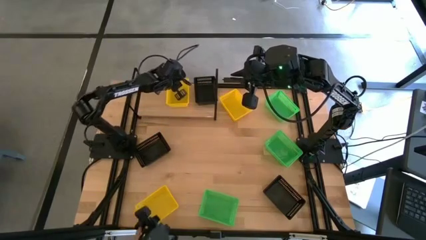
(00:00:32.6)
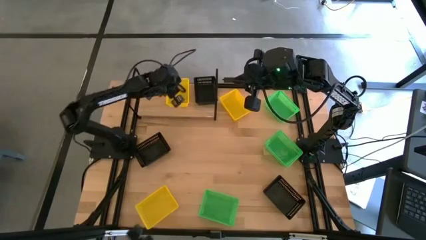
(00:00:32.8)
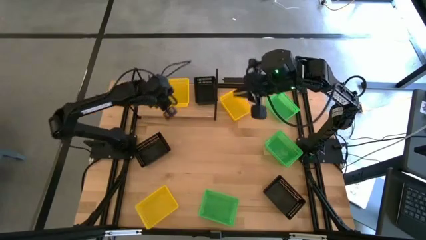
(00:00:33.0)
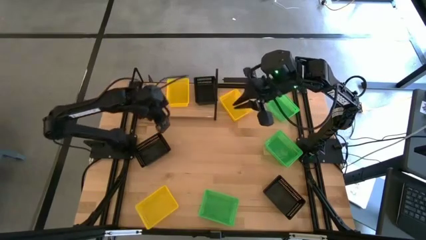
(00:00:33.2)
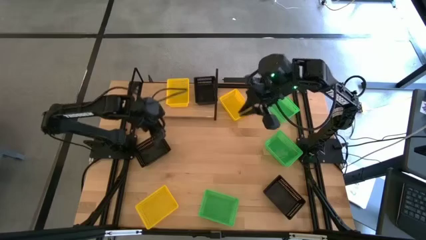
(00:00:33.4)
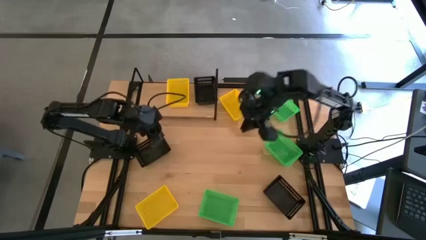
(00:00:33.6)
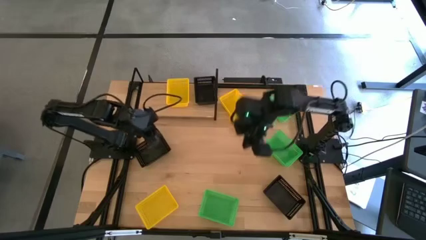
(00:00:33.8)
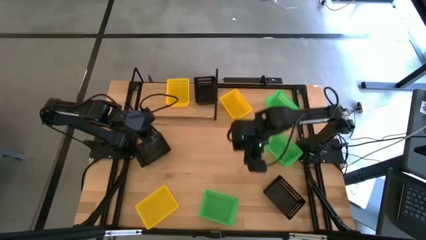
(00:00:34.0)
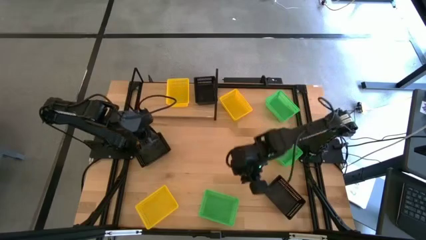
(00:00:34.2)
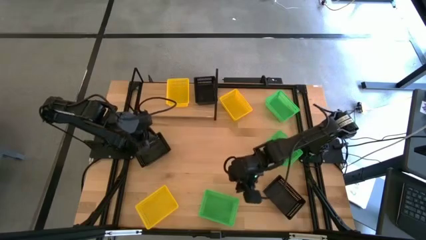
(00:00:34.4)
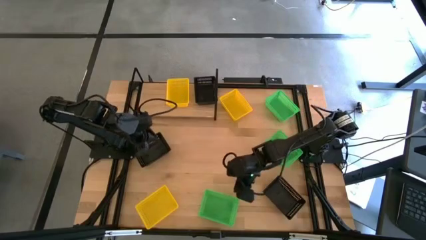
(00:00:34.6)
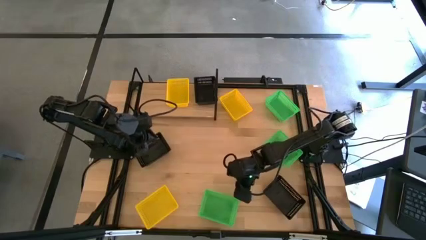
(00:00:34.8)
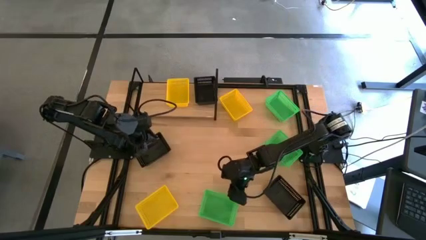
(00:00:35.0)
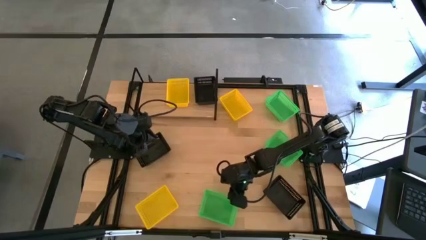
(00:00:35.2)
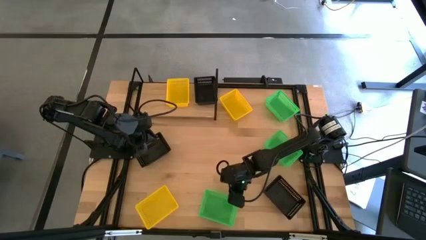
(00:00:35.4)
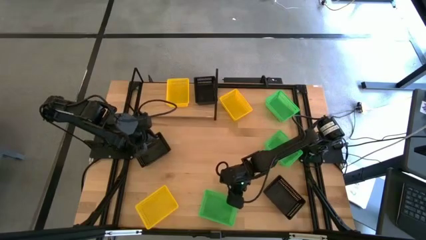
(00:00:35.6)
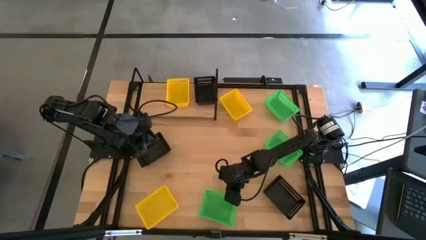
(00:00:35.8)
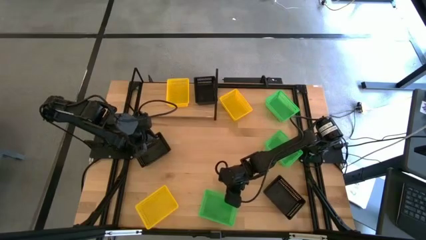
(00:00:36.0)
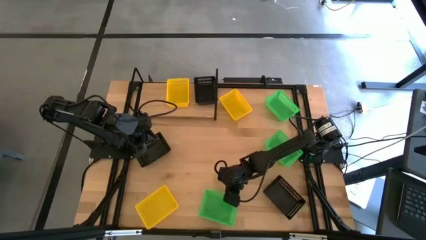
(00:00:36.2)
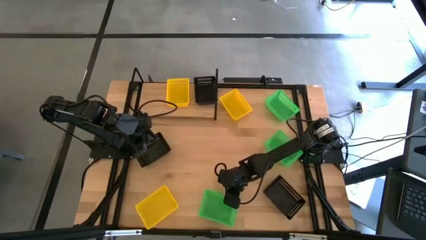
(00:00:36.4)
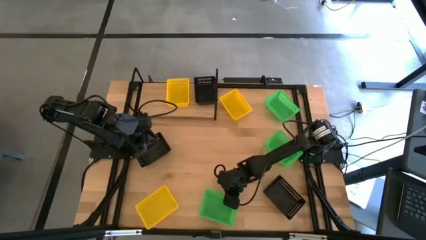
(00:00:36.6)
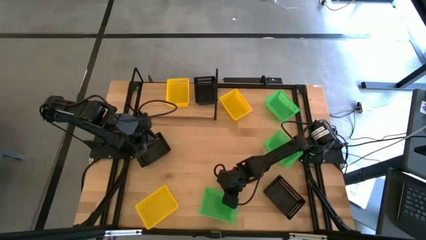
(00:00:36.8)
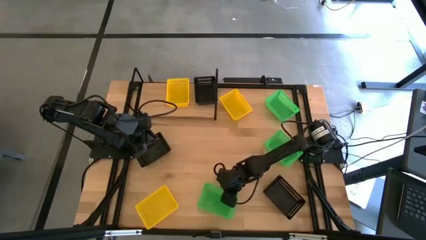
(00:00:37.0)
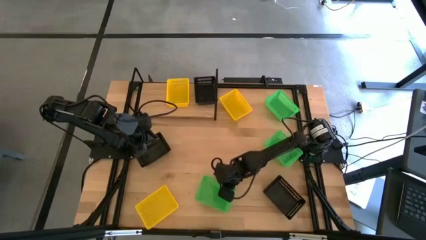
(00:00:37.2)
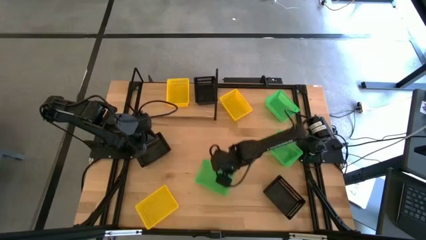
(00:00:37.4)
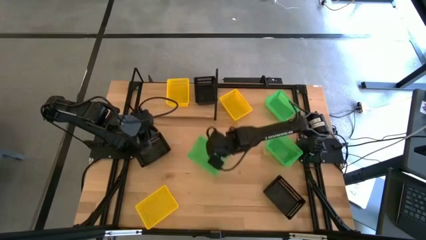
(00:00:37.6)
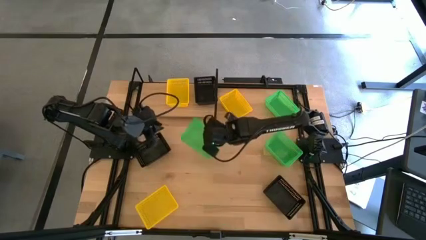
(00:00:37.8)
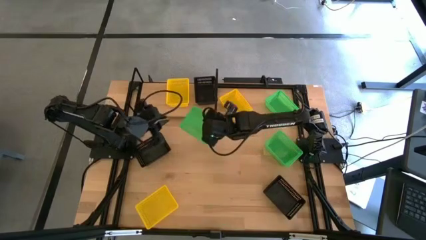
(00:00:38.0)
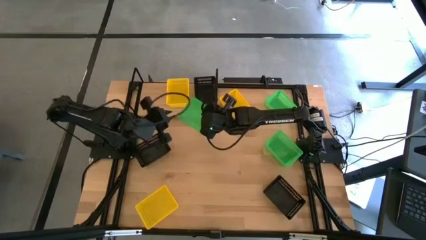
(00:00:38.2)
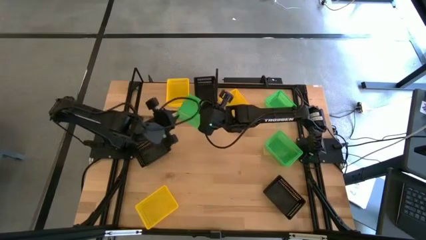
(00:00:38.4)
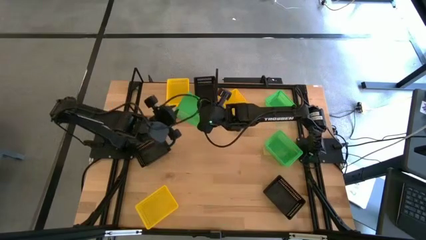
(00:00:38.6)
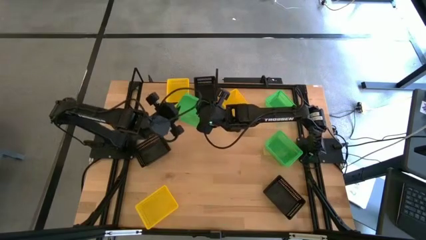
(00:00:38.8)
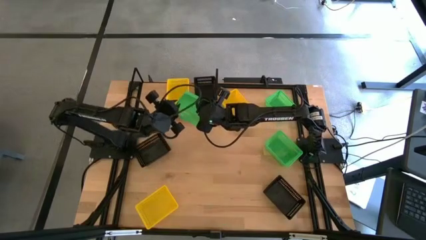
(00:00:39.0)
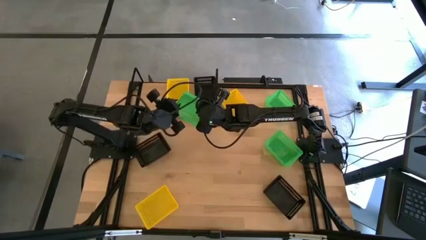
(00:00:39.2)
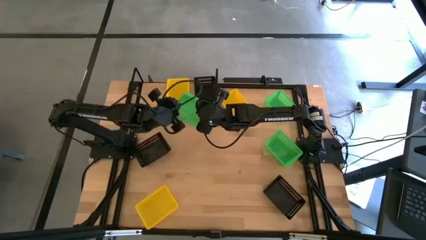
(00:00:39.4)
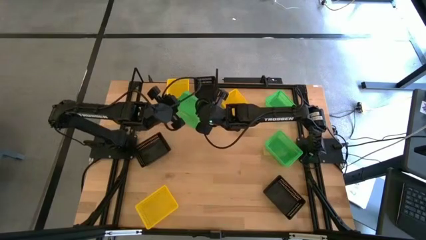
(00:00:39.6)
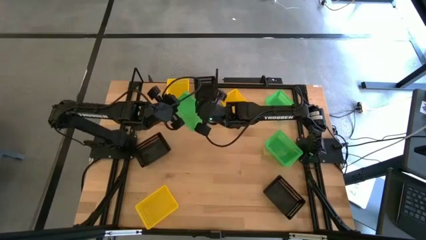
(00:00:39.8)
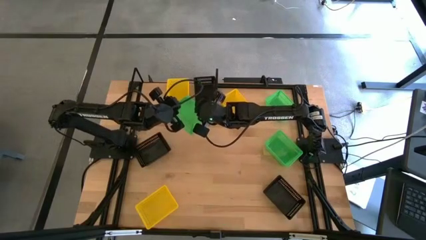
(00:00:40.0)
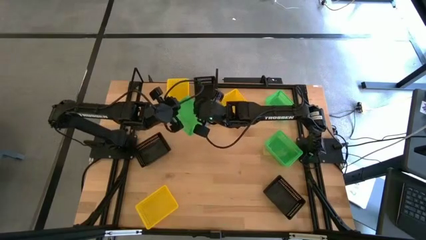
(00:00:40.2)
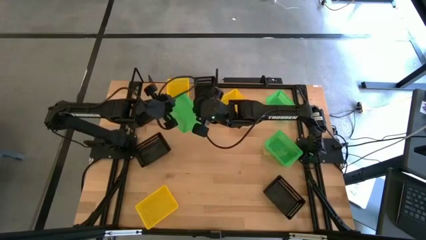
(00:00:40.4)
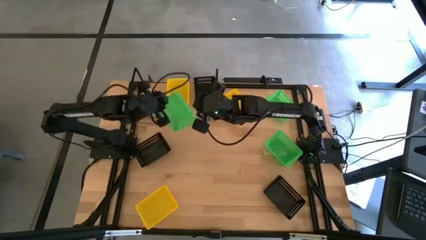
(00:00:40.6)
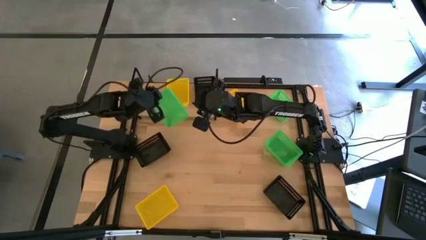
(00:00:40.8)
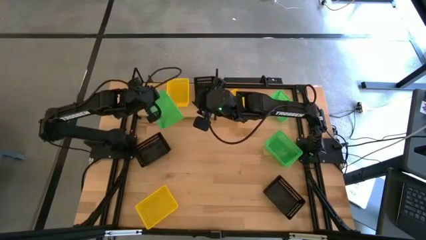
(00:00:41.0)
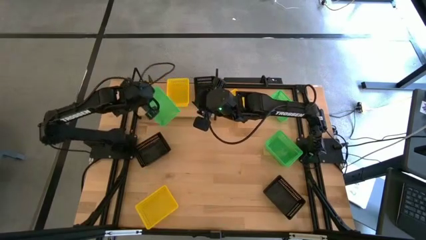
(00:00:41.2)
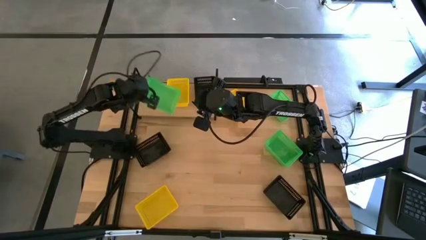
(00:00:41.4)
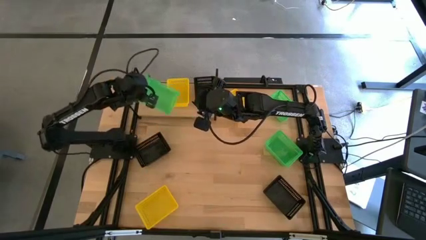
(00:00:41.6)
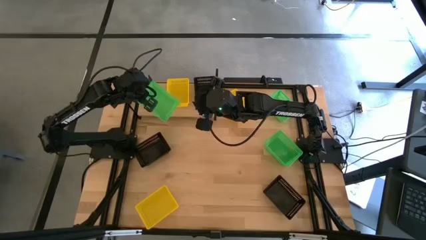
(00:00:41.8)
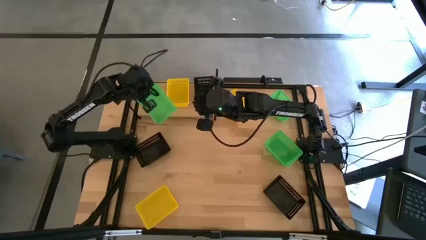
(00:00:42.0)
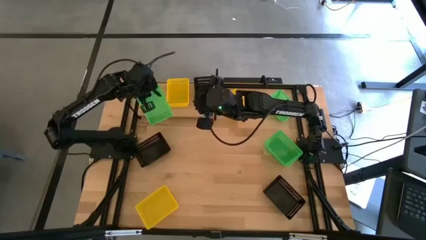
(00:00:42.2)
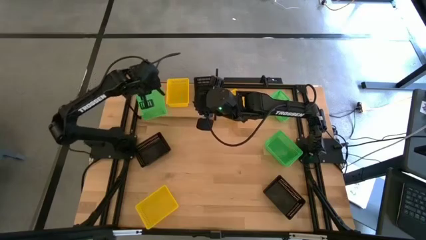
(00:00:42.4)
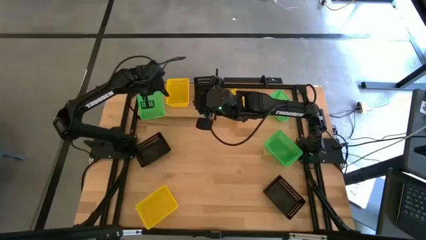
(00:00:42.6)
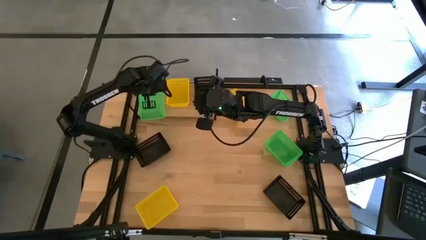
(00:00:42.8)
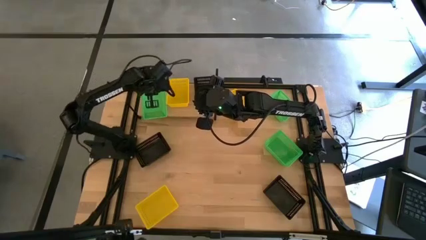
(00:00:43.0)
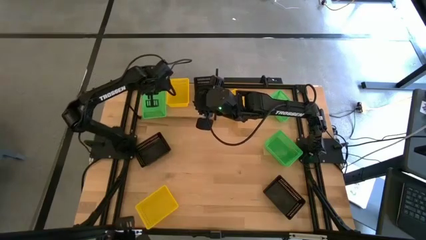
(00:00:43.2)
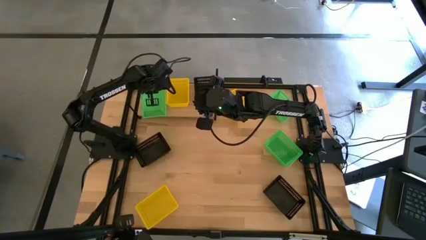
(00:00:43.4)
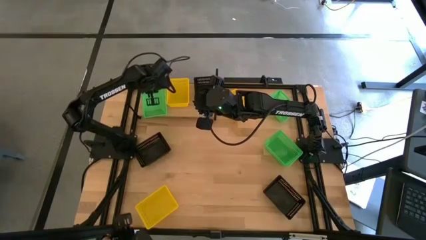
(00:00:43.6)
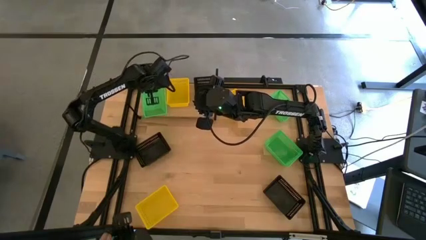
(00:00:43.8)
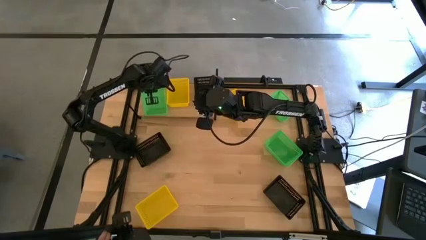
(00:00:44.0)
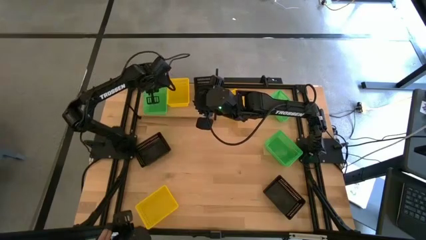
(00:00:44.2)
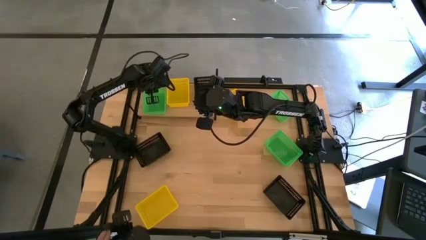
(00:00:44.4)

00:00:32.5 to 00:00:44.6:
Task: Stack baskets on shelf by color
Put the bottom green basket on the shelf
